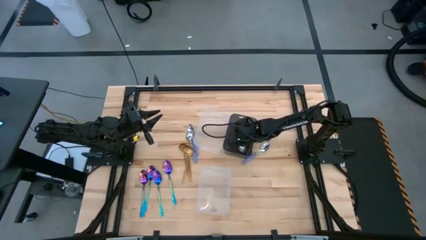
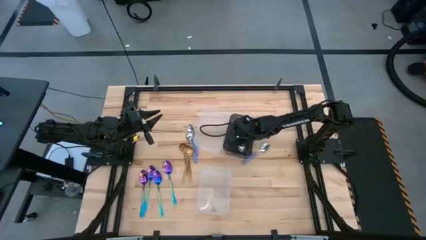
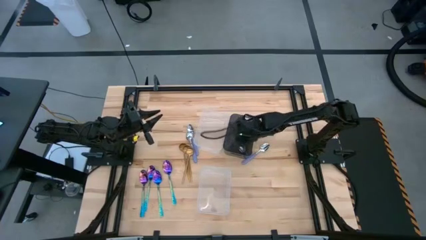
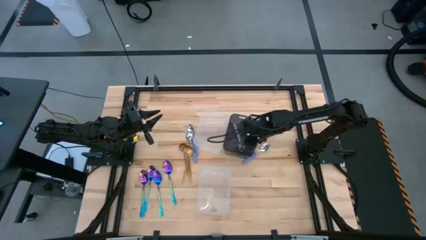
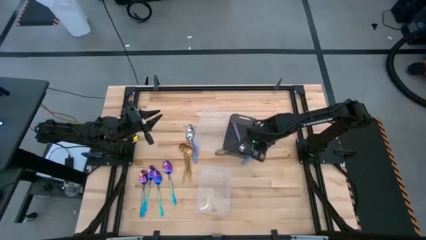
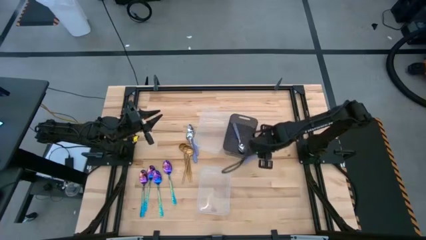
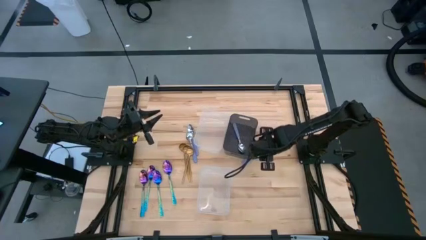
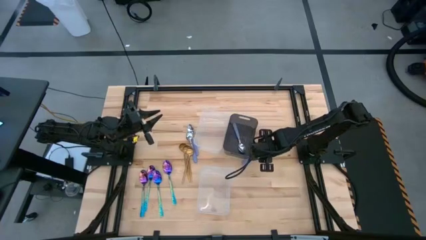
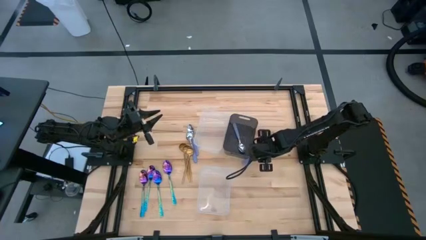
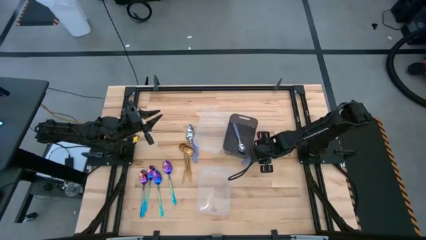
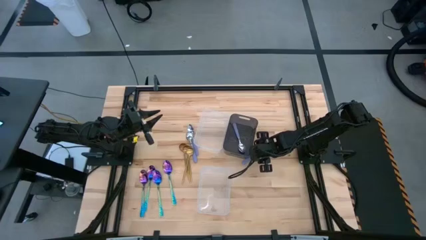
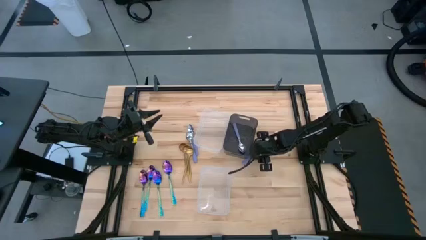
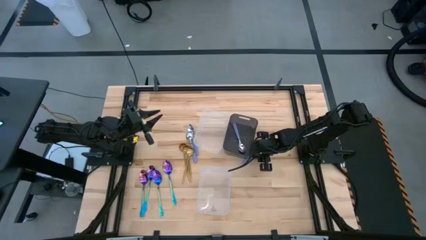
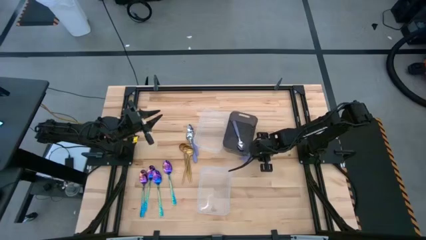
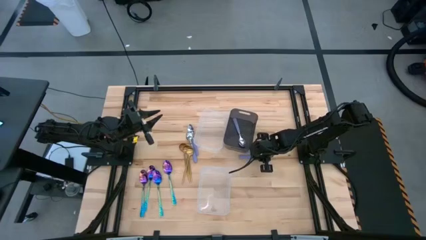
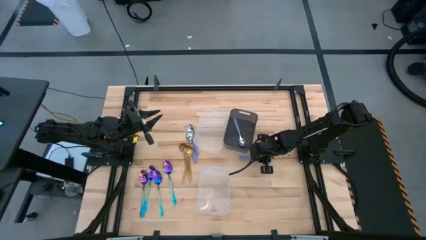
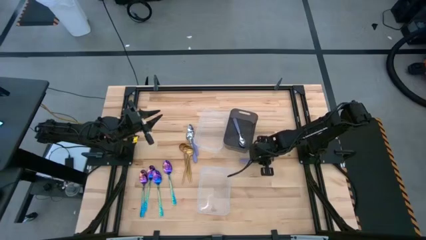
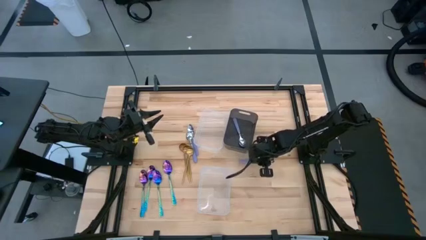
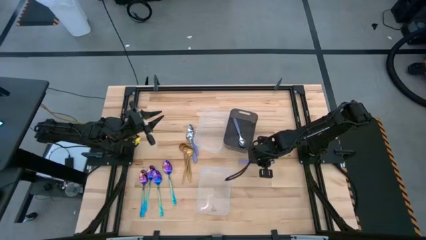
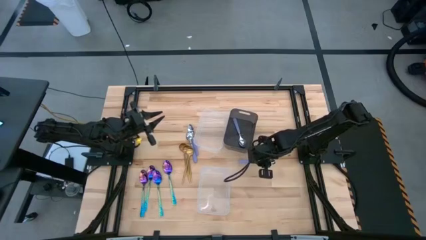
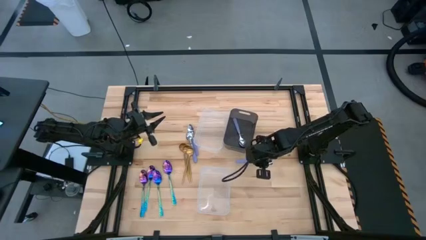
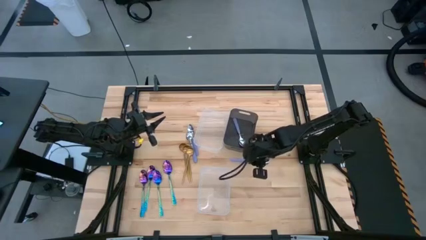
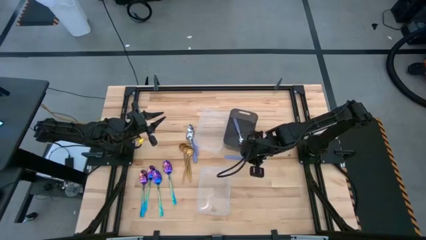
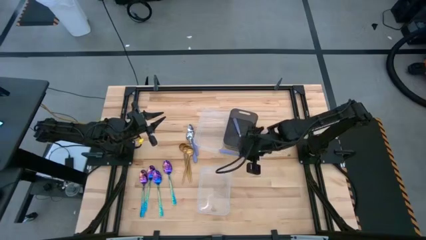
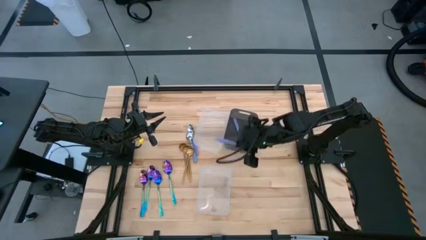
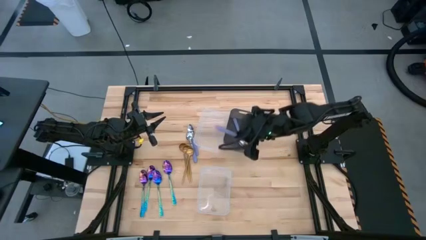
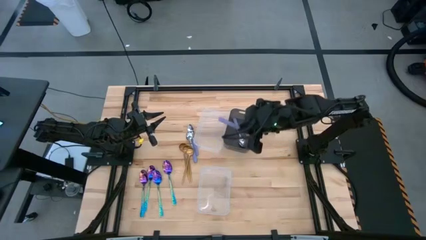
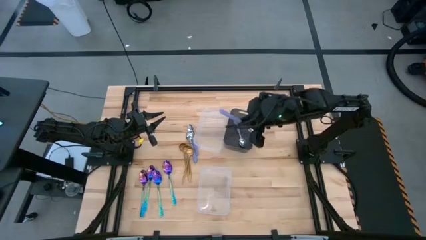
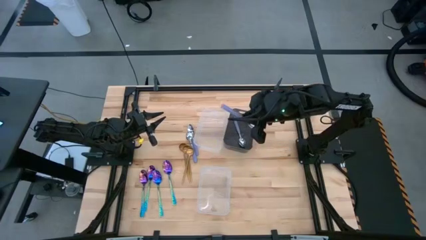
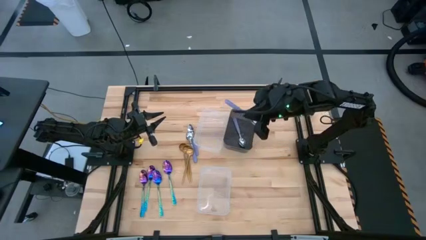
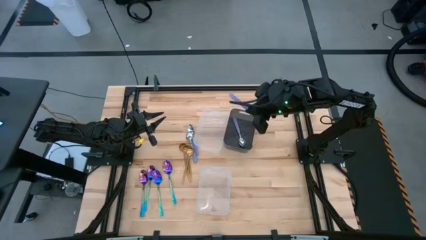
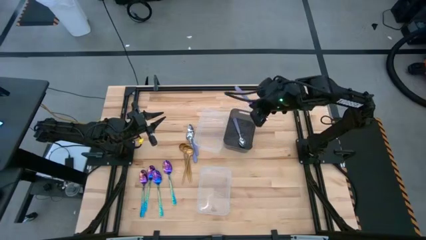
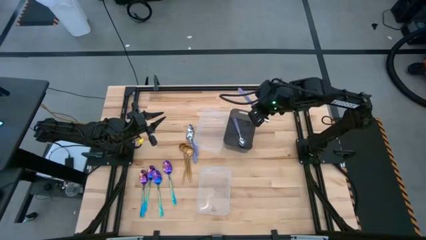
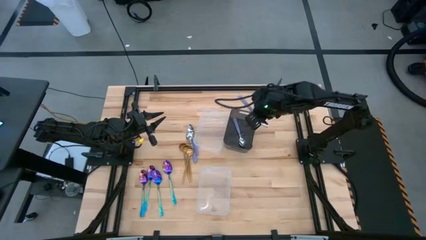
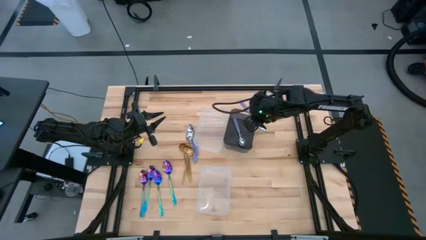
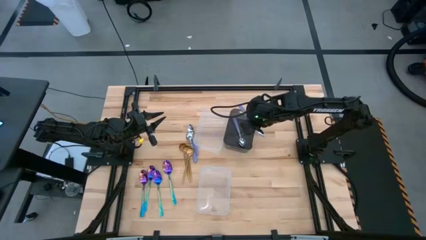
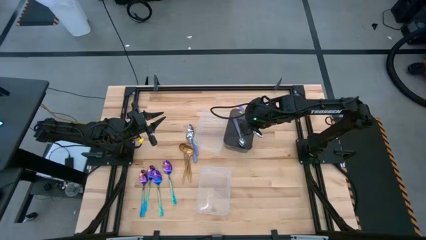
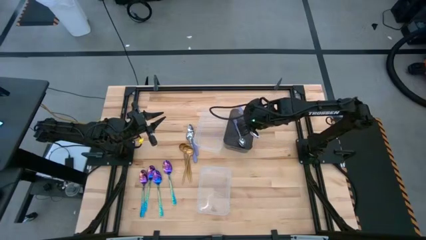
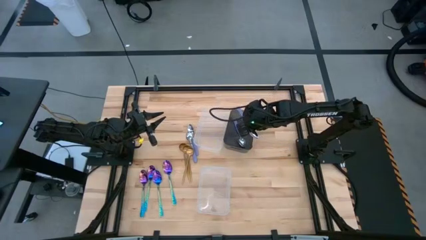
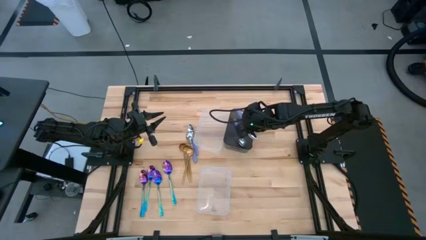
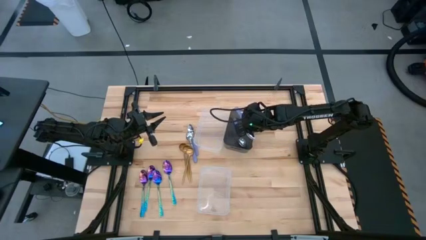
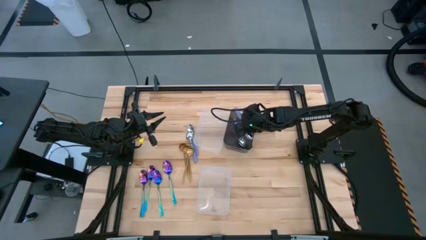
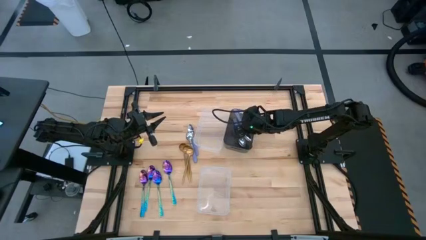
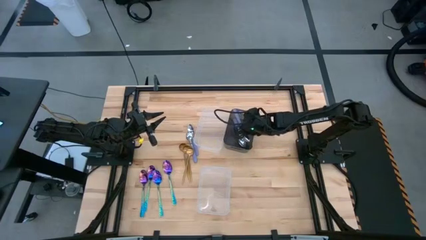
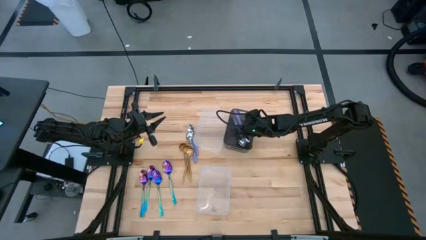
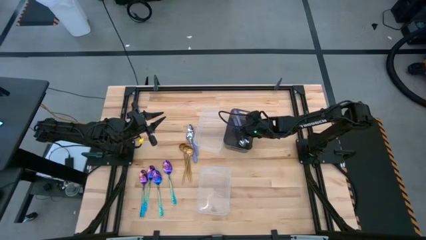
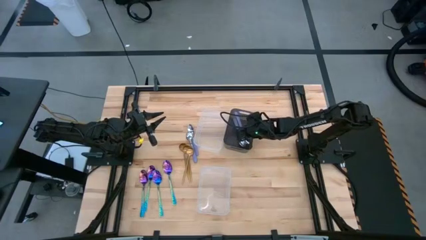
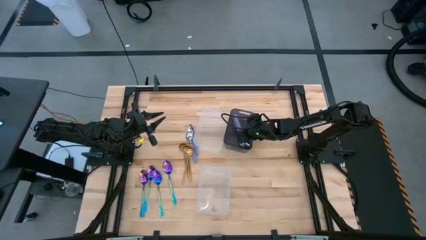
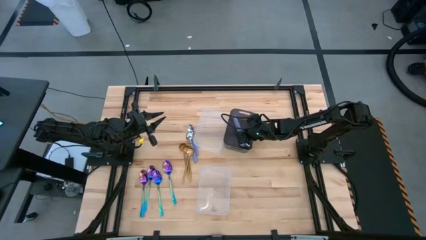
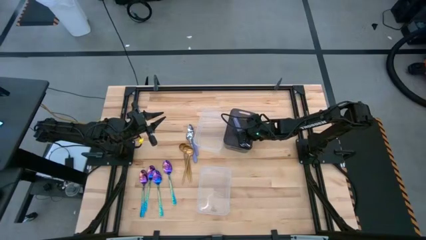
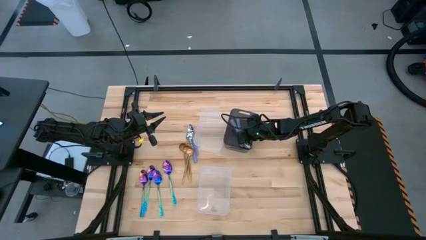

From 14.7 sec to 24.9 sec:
Task: Sort silverware by color (type)
Put the purple spoon into the black bin
